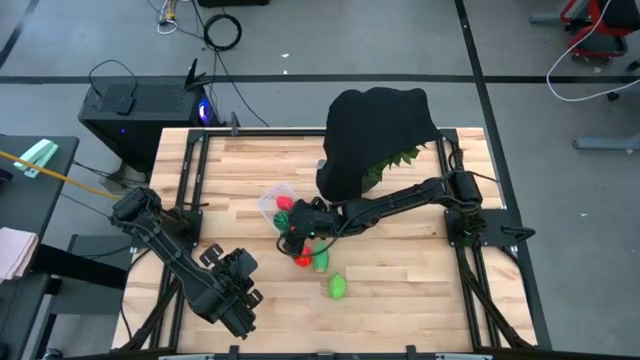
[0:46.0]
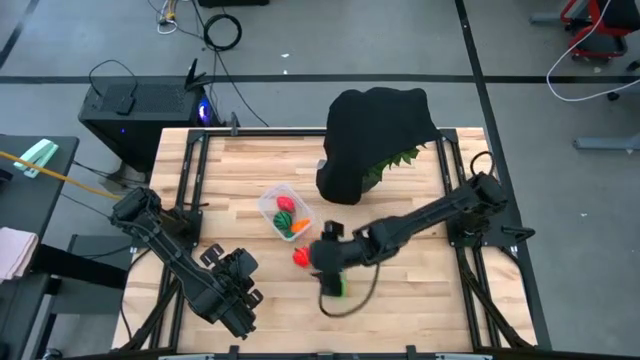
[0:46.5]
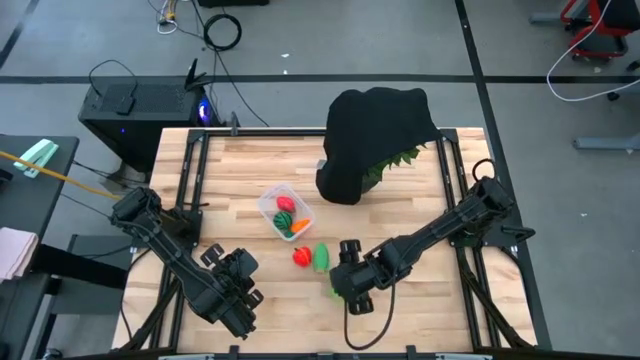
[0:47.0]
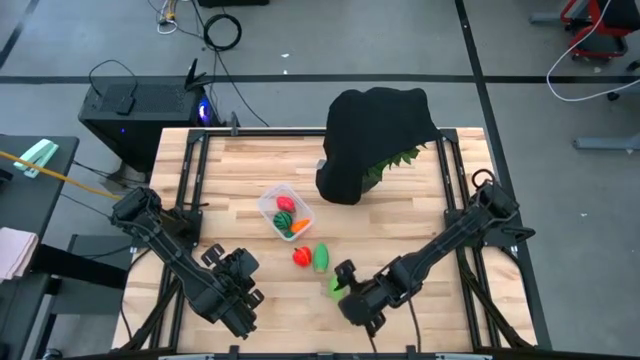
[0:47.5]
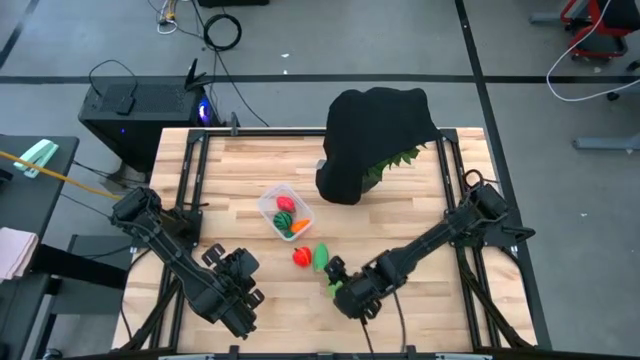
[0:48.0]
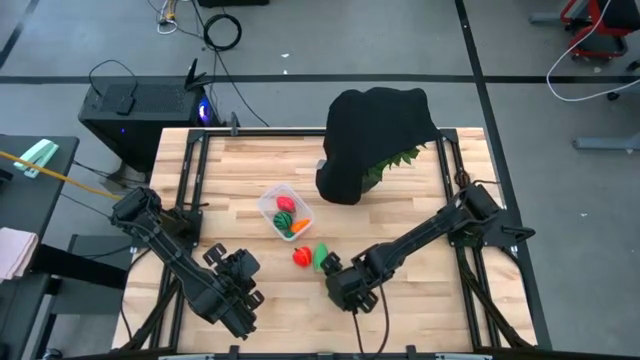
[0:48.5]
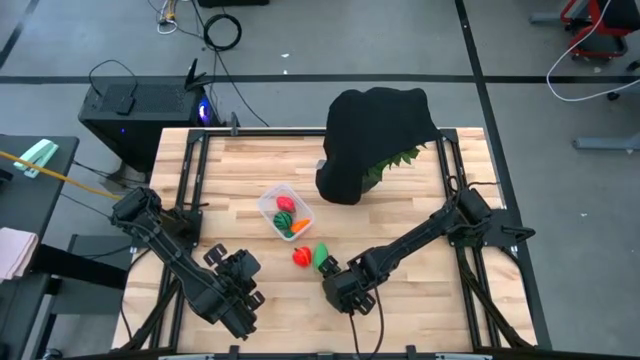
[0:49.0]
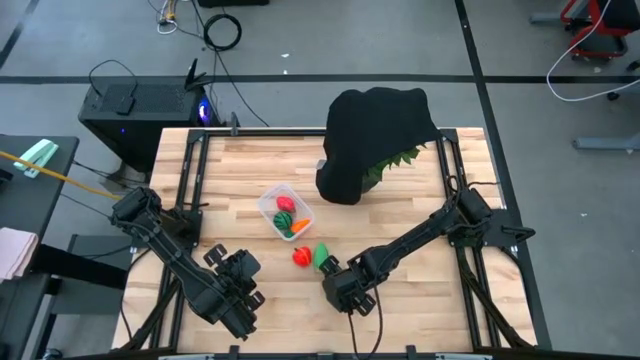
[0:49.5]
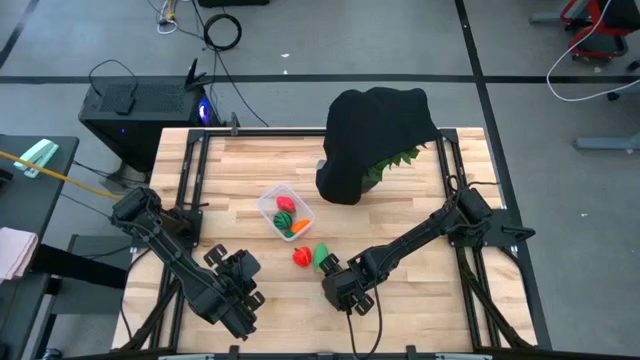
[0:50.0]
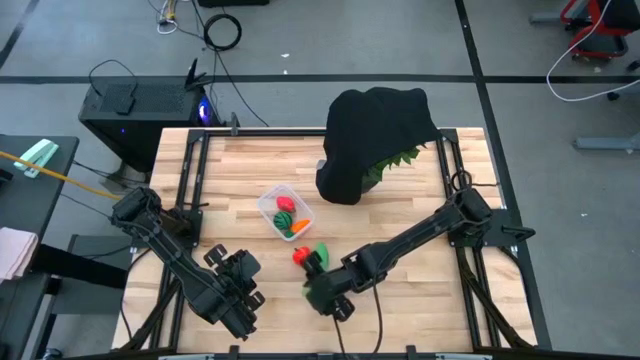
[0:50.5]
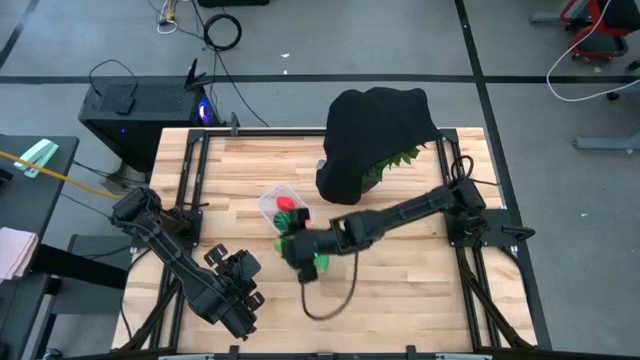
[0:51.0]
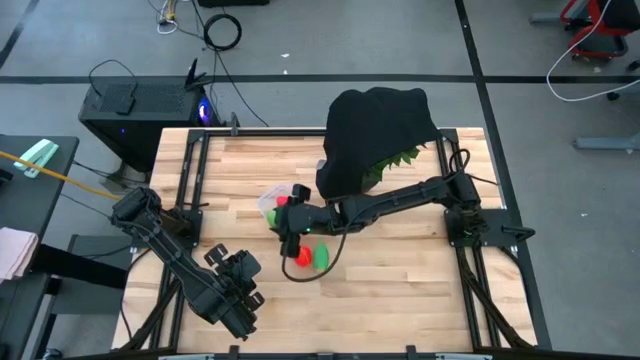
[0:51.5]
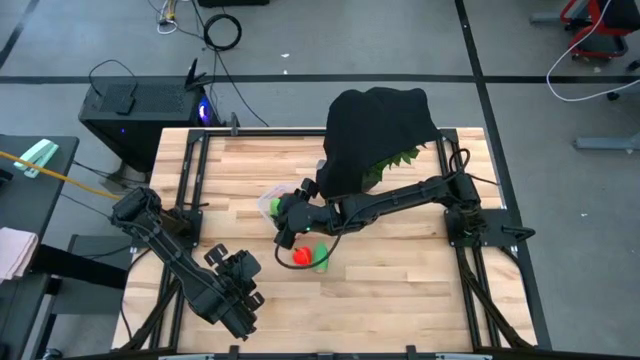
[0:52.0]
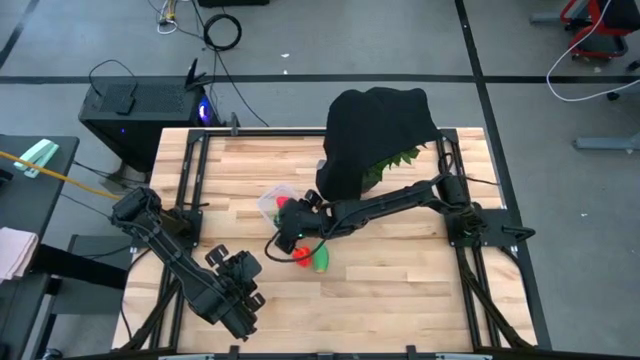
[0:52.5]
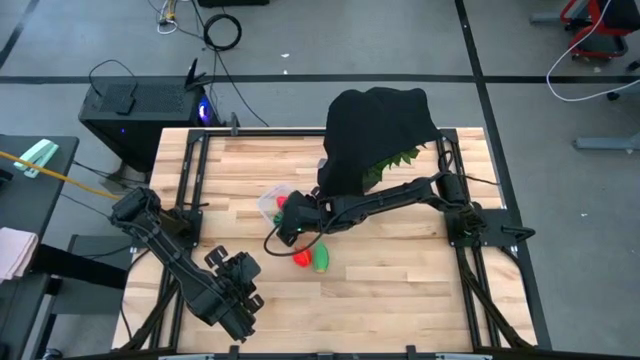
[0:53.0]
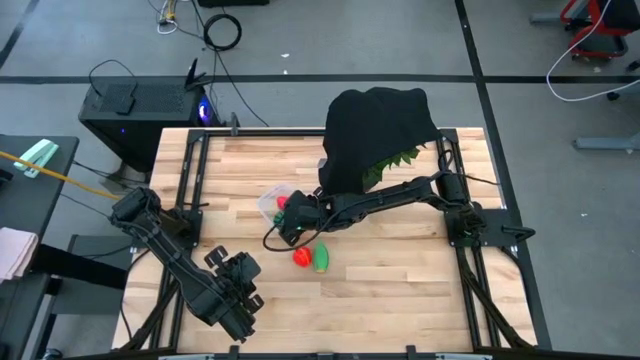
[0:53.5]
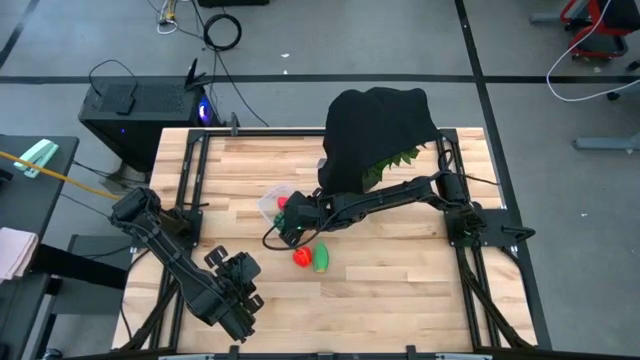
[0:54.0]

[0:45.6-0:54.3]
Task: Pick and placing Produce into tupperware
Put the green melon into the transparent bin

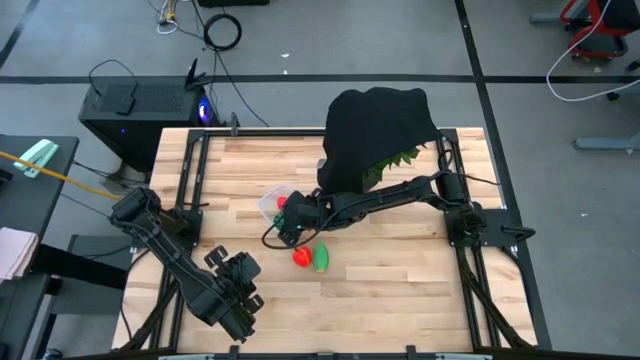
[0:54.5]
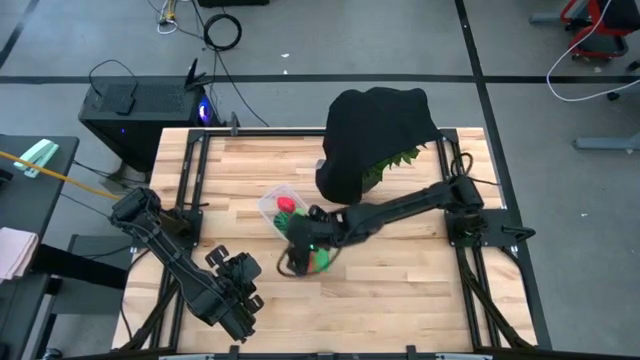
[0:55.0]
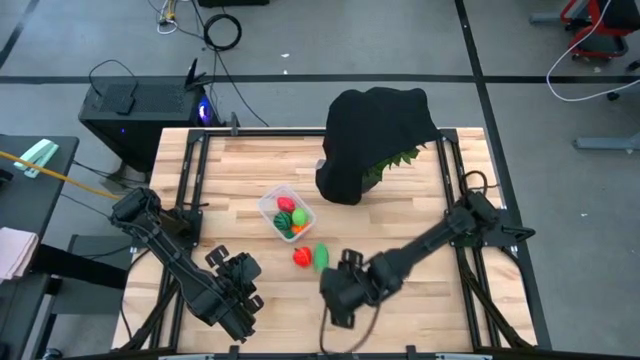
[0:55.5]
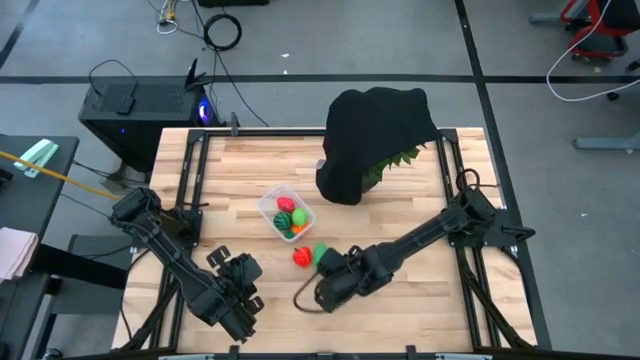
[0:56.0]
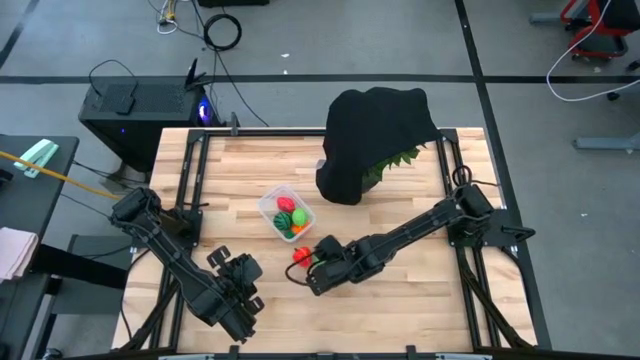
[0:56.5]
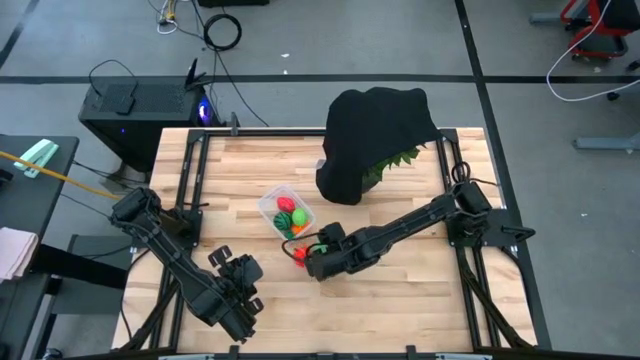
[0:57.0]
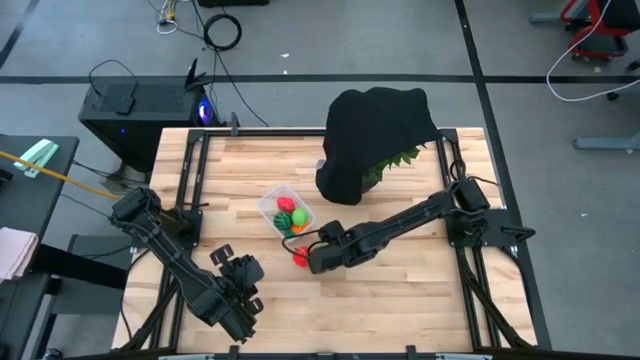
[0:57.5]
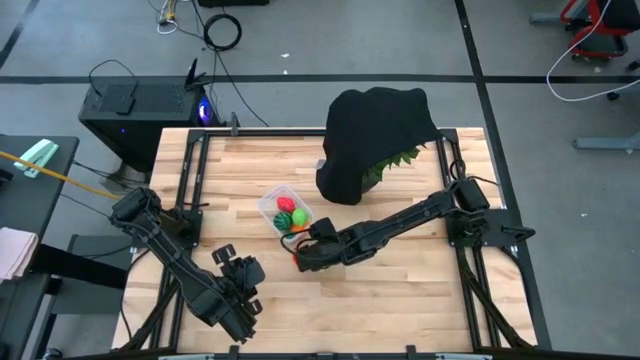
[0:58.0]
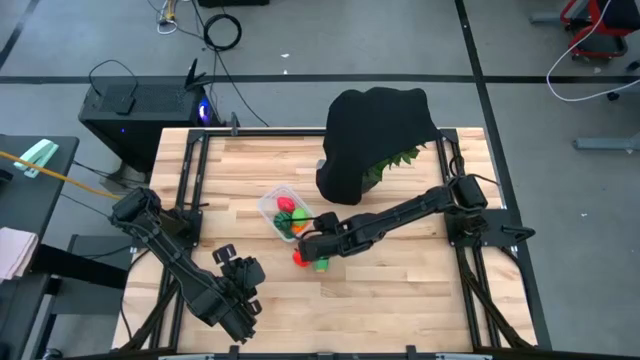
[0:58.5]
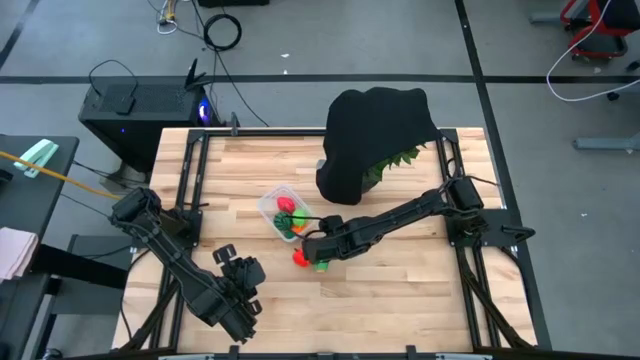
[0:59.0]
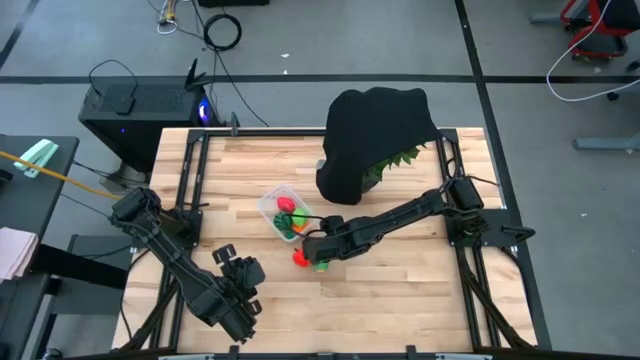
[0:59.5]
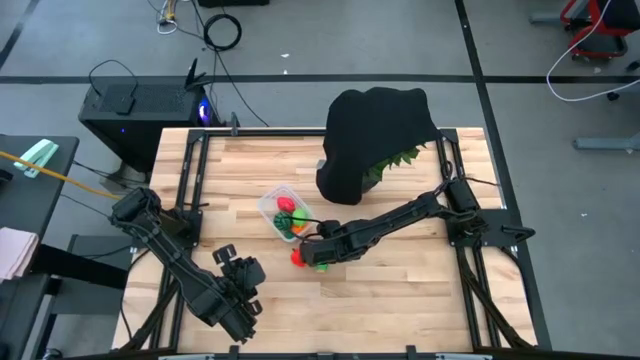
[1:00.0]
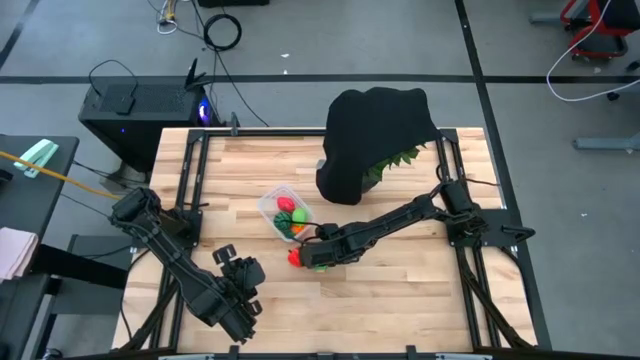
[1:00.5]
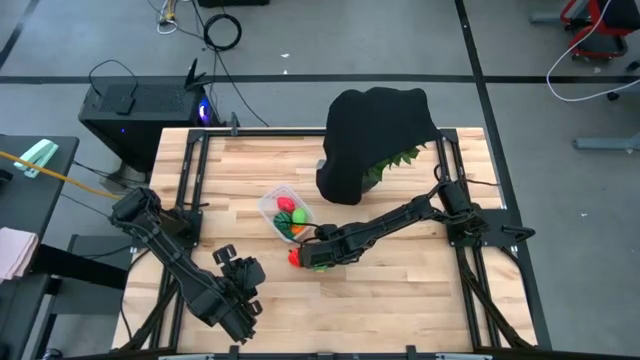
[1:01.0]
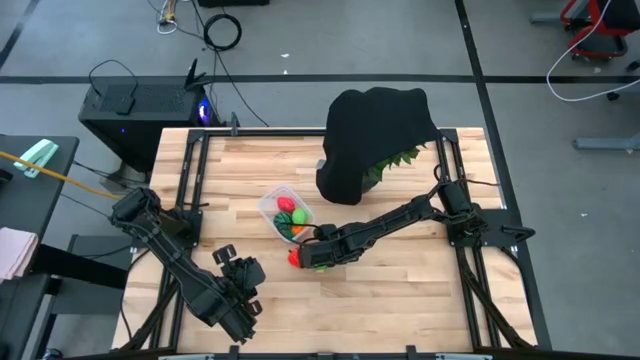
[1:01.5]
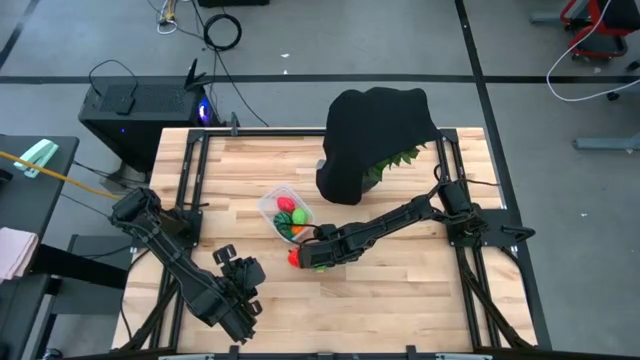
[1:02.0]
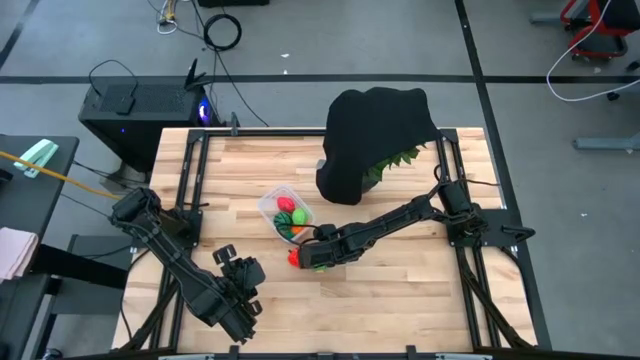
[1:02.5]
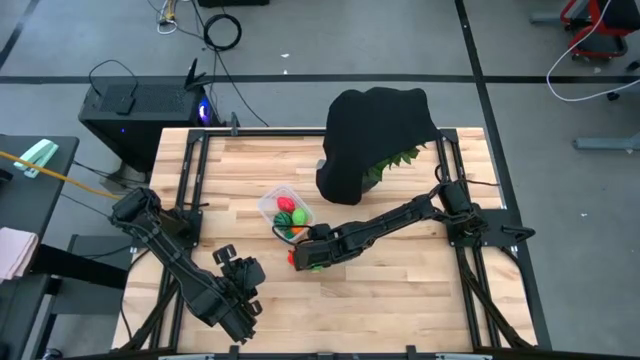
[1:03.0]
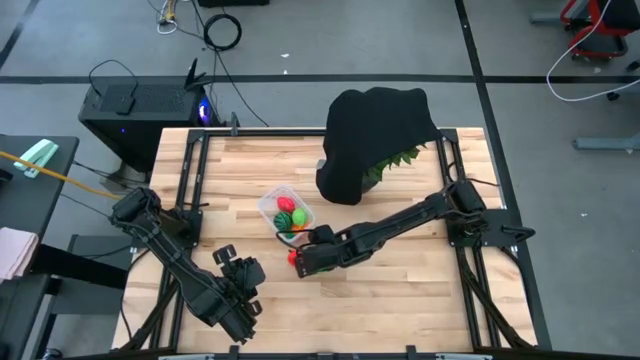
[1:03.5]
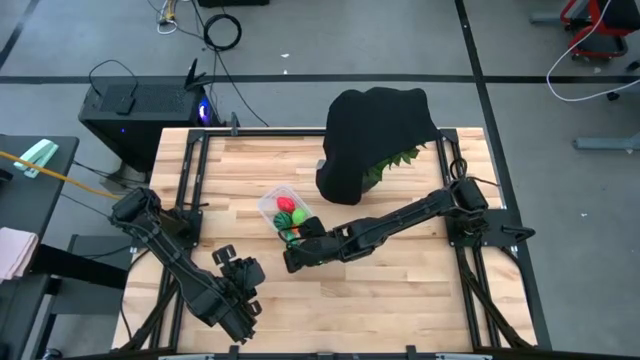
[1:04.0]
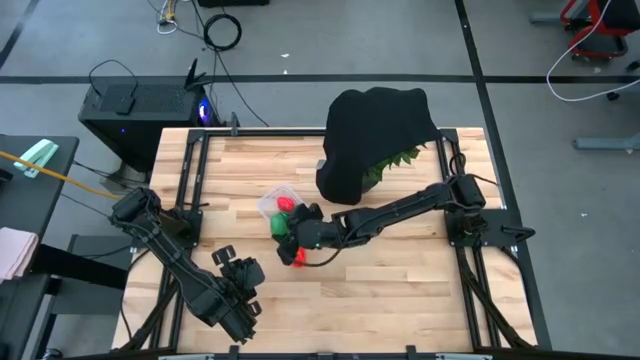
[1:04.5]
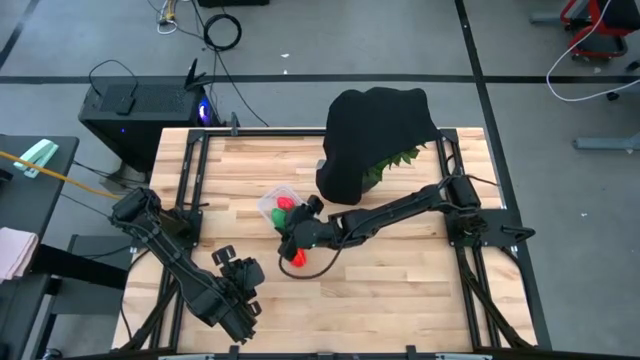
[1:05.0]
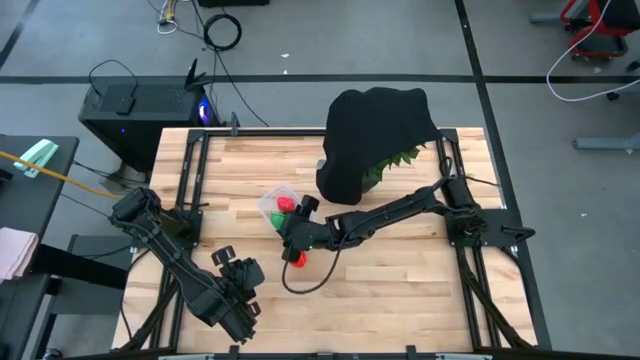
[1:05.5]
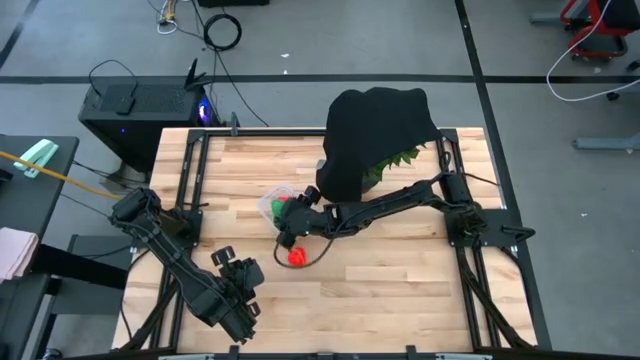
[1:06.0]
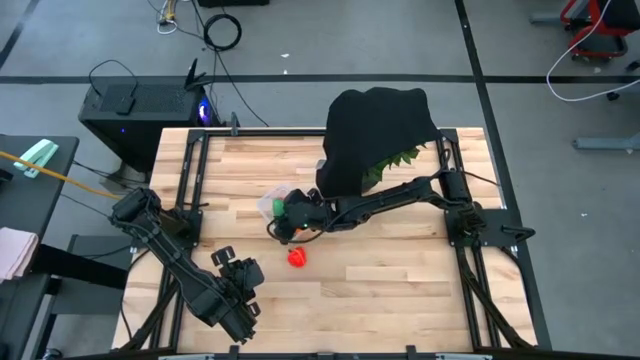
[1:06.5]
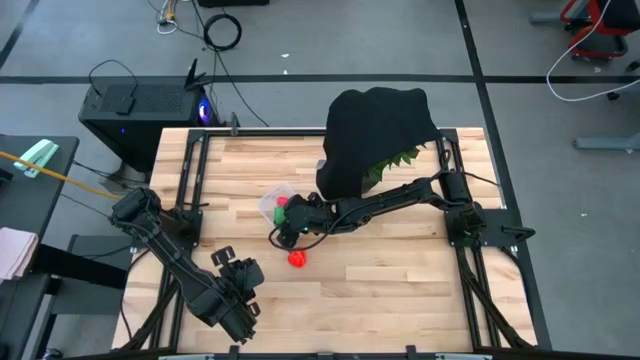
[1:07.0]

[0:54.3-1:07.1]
Put the green corn into the transparent bin
